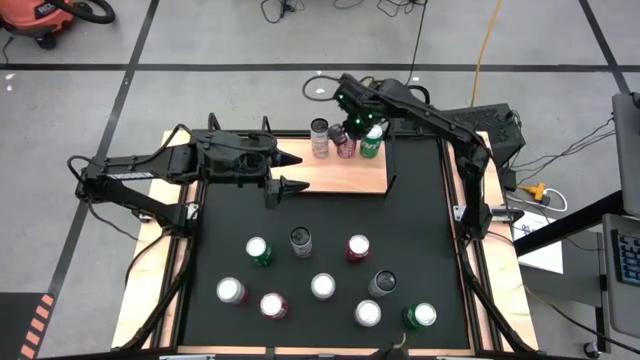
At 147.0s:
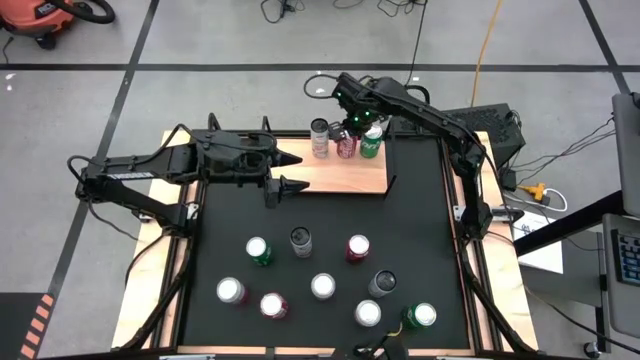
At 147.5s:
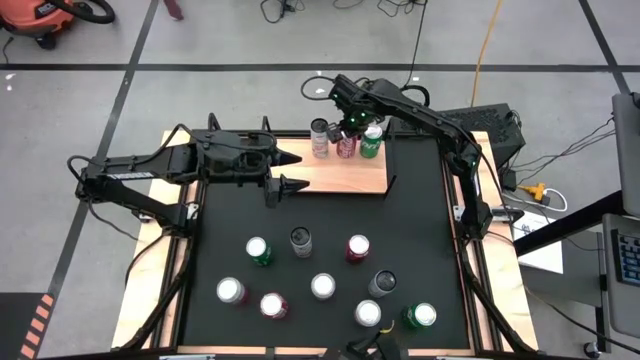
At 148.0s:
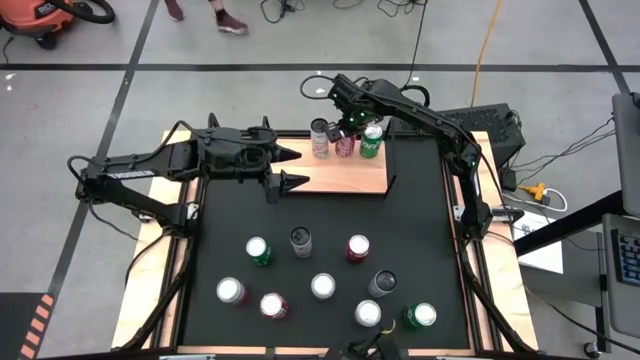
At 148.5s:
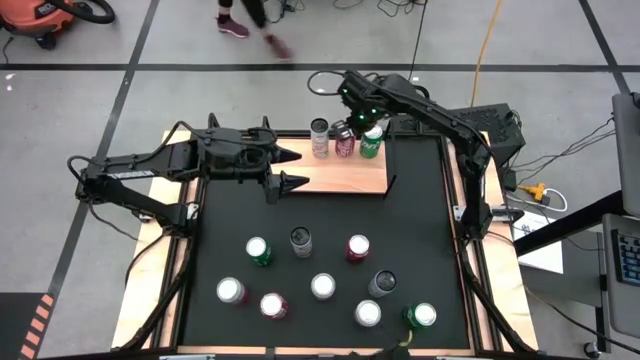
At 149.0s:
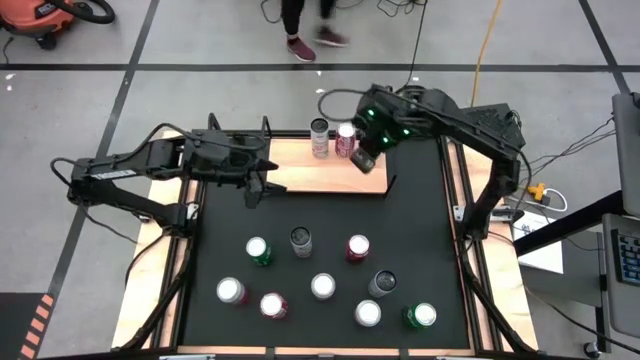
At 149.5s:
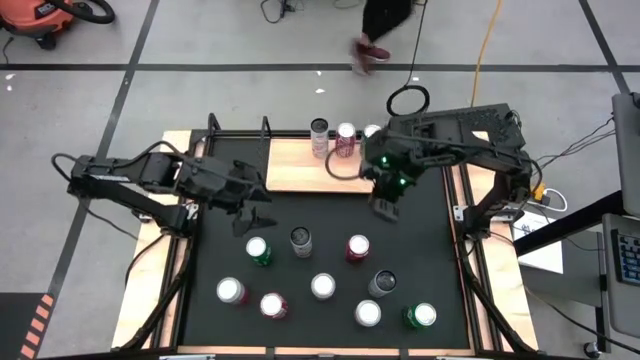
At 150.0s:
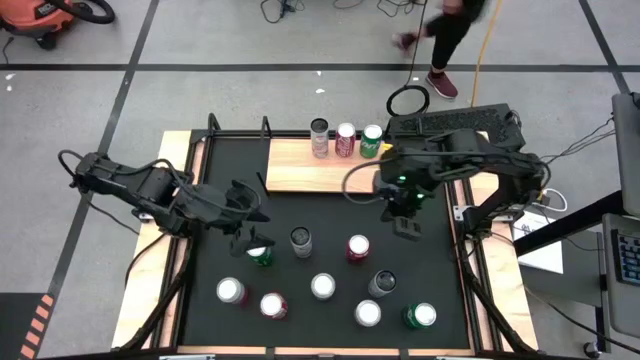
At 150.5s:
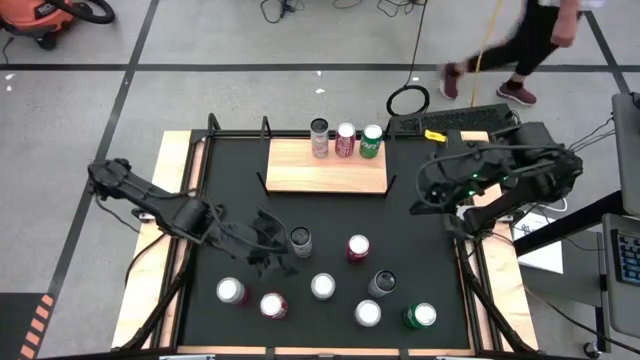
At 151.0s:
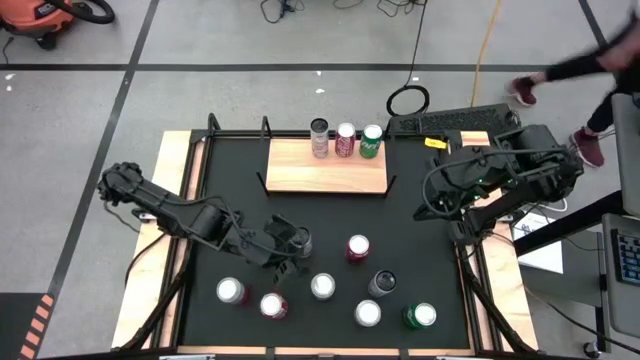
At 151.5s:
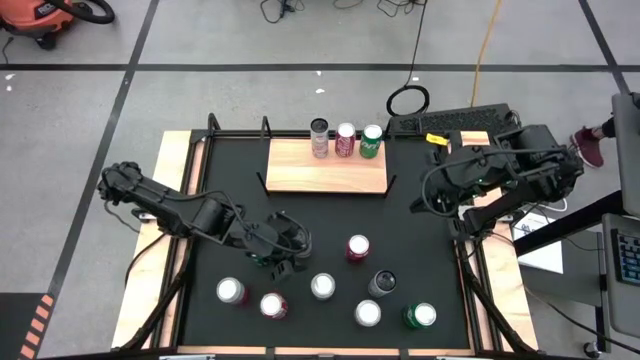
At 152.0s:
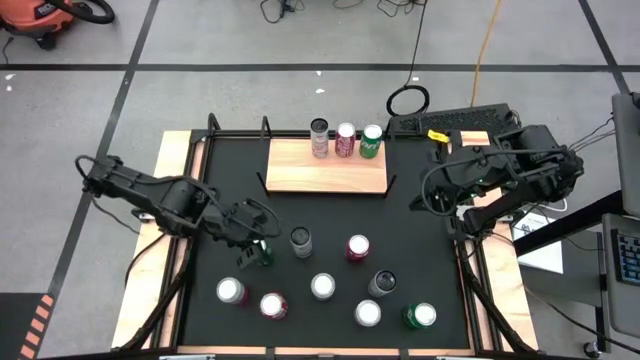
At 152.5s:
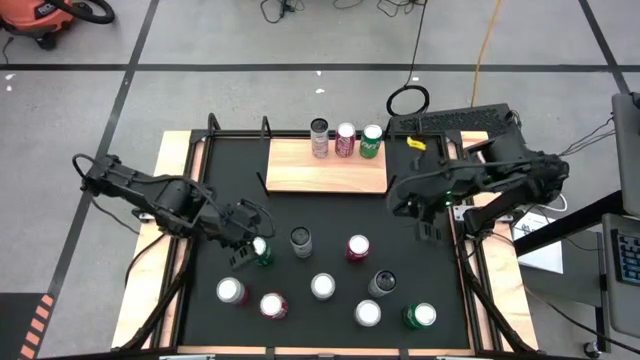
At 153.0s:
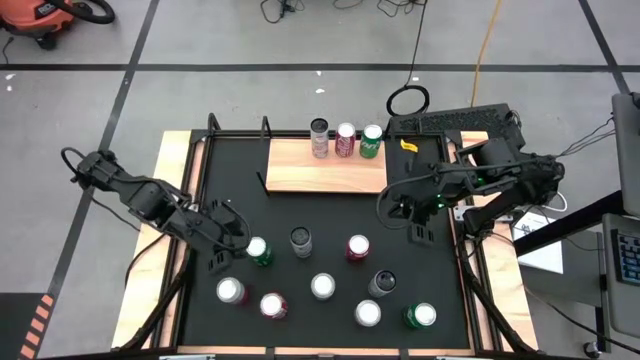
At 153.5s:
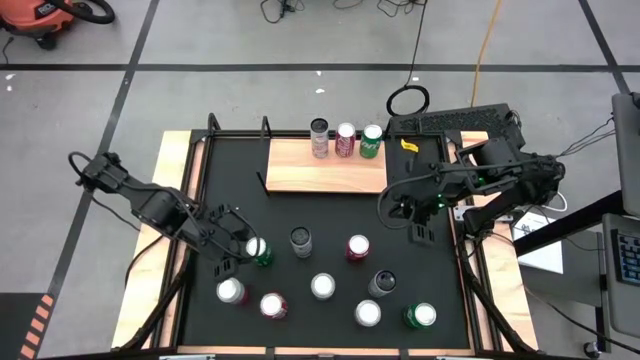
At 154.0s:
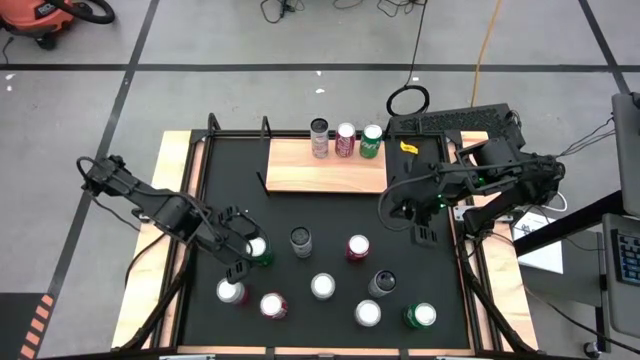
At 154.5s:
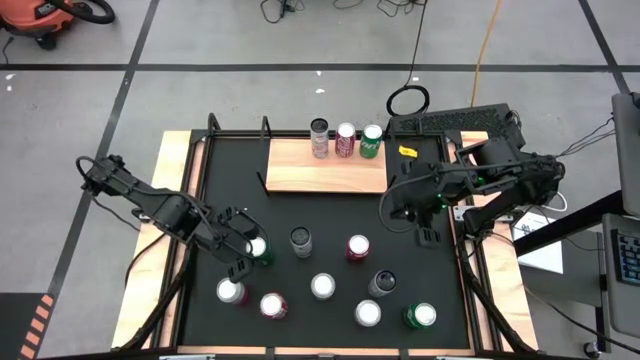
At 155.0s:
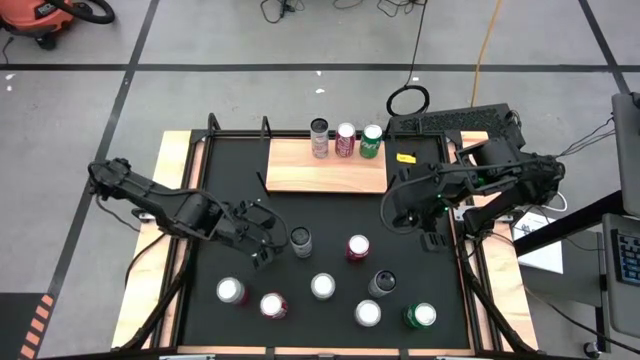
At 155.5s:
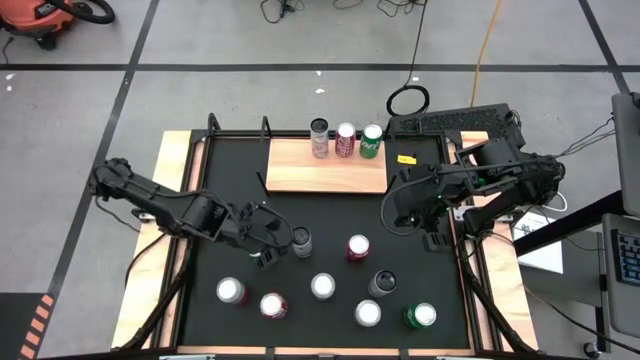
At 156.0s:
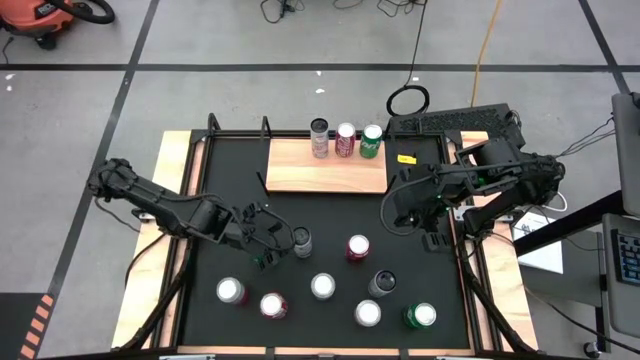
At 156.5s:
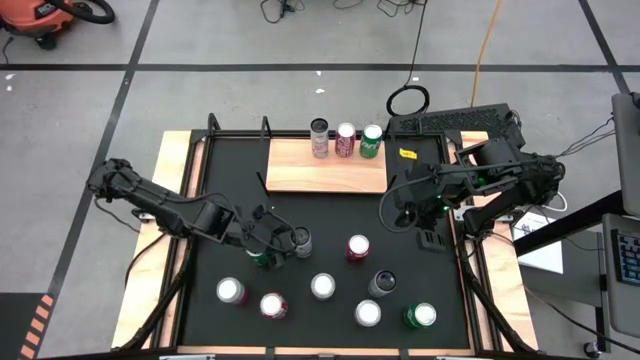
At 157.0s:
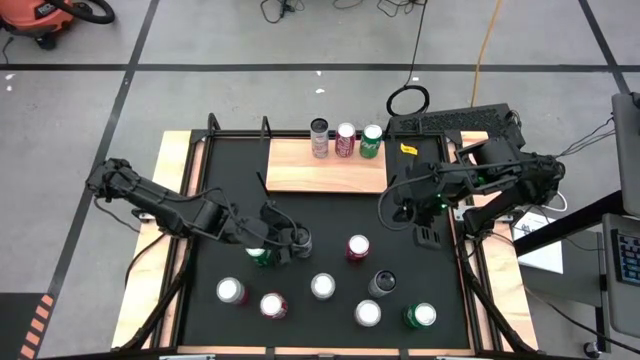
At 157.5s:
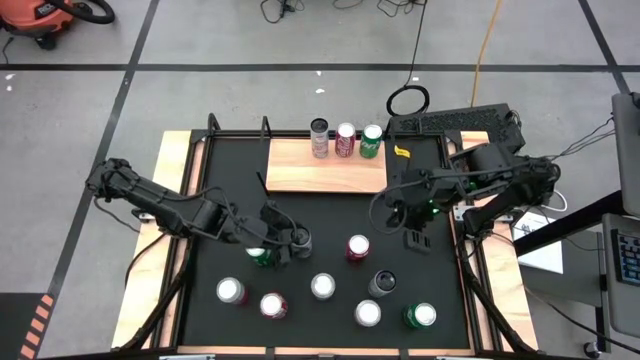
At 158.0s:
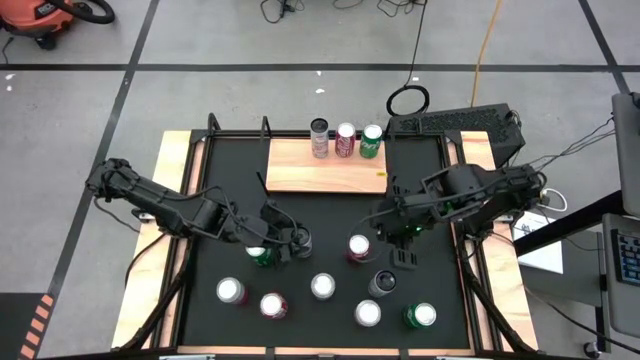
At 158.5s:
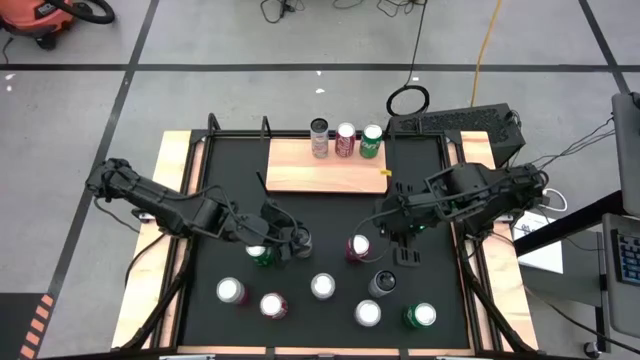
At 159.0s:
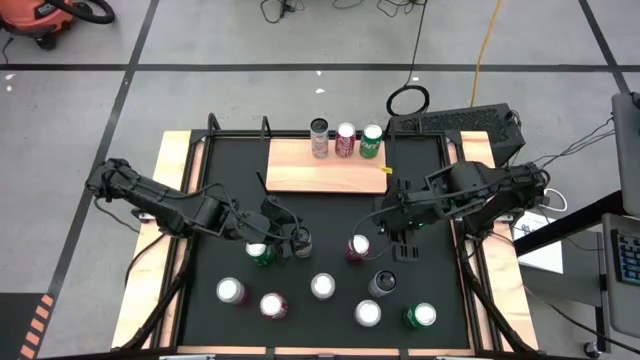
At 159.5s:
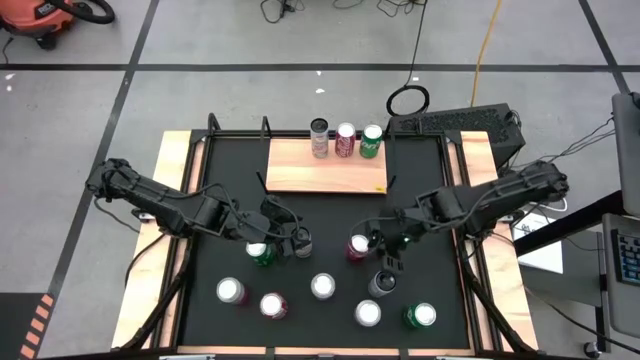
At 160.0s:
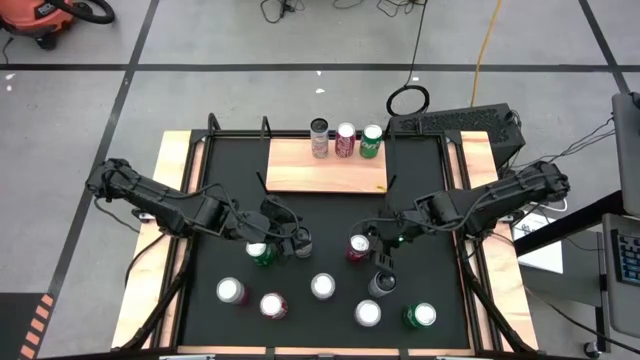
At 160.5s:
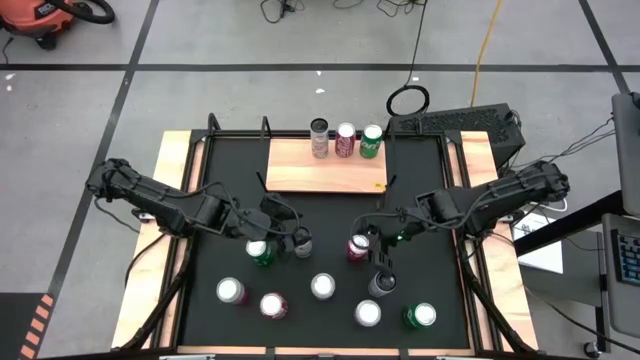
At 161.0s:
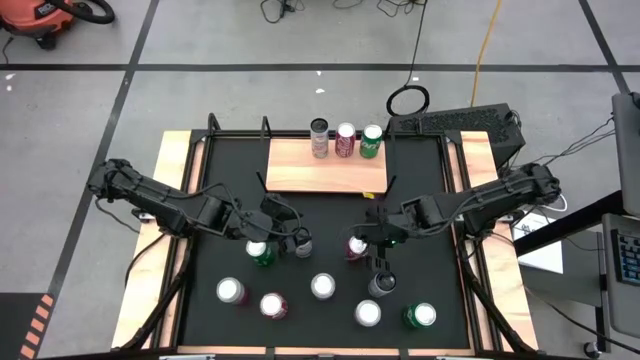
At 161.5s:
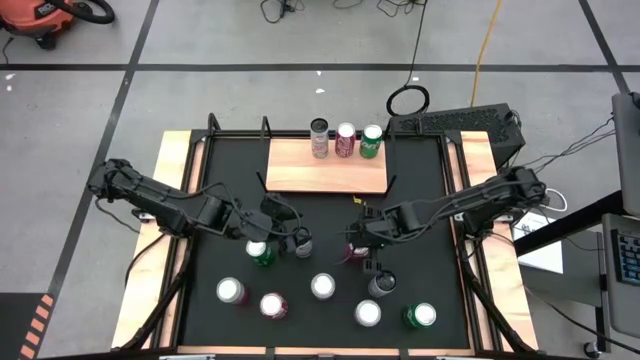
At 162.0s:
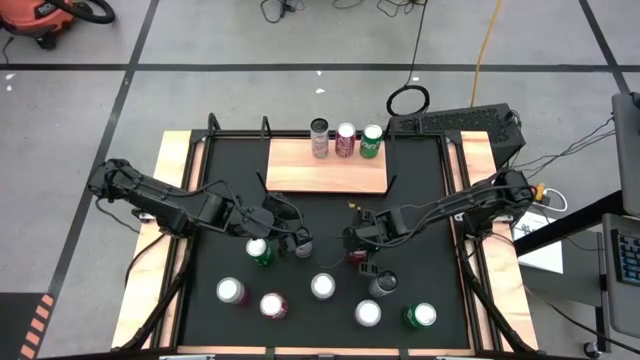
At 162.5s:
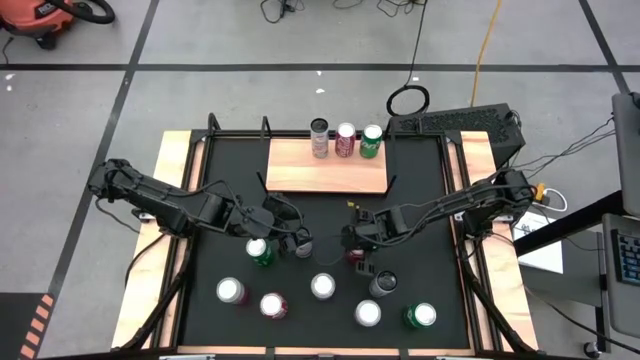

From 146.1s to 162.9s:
Task: Place canned beverage on shelf
Put the top red soda can on the shelf

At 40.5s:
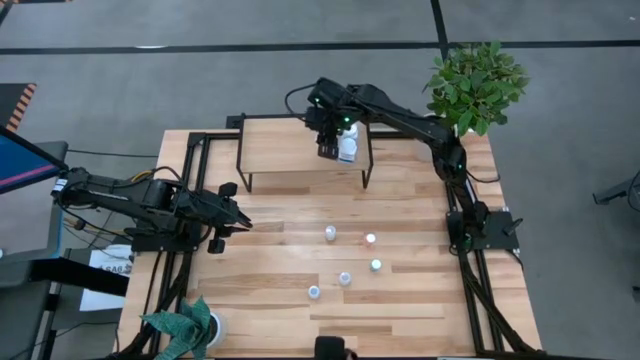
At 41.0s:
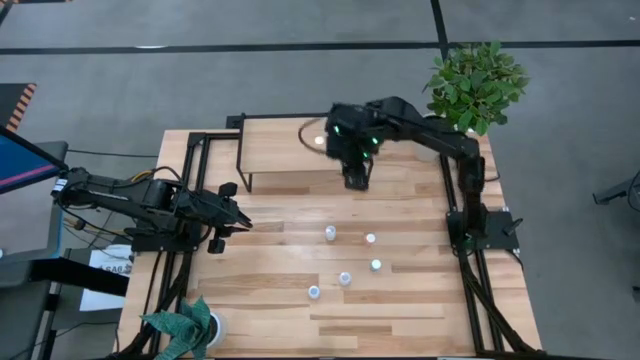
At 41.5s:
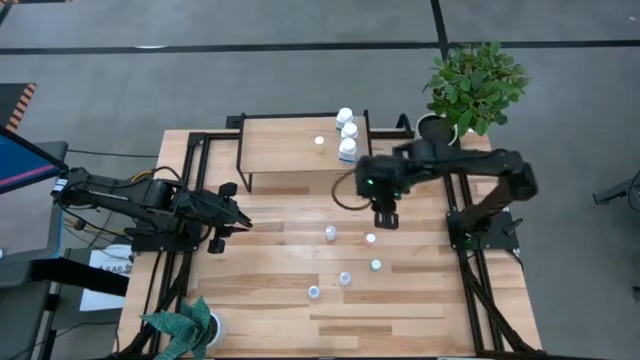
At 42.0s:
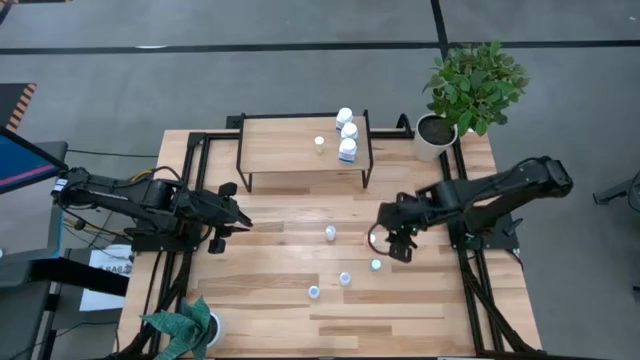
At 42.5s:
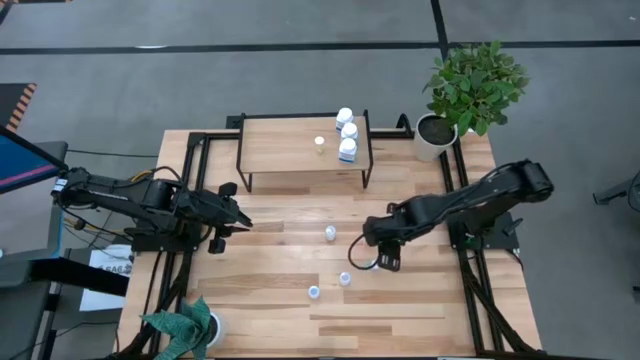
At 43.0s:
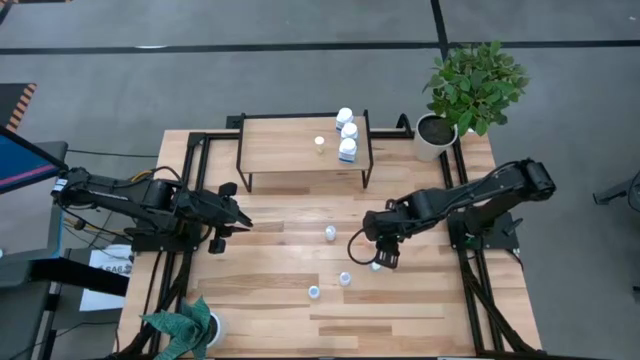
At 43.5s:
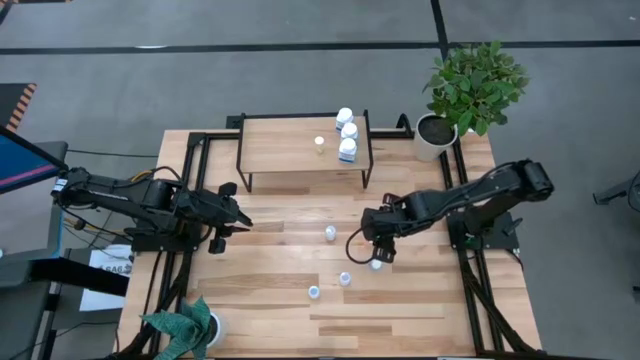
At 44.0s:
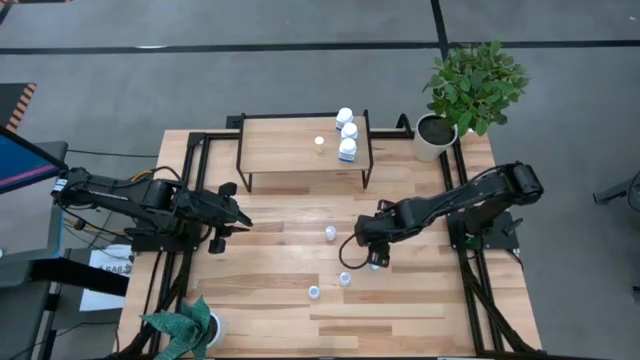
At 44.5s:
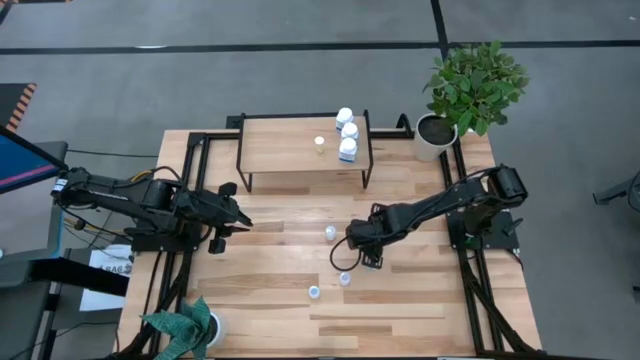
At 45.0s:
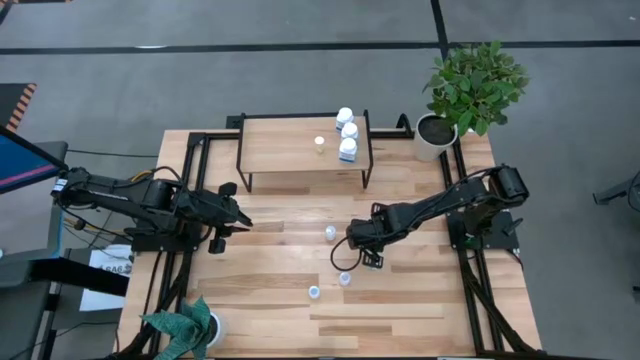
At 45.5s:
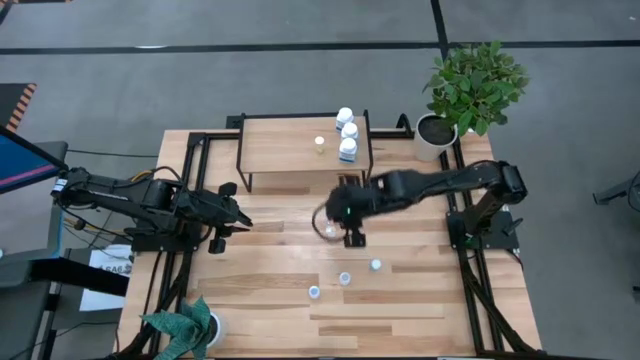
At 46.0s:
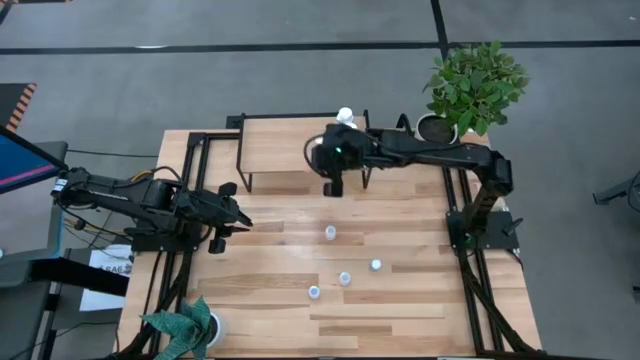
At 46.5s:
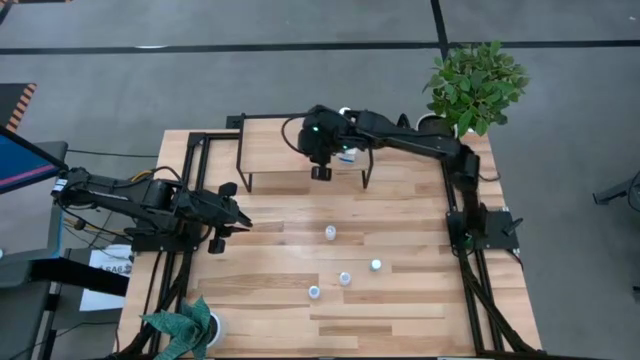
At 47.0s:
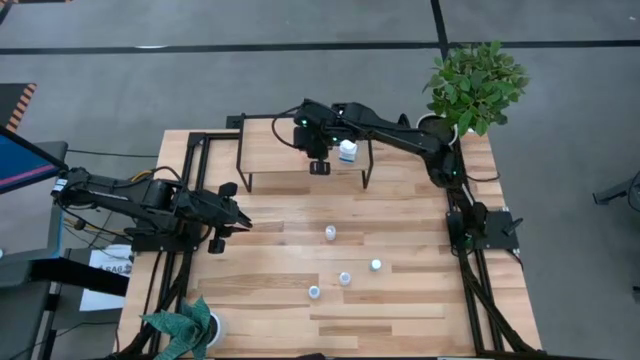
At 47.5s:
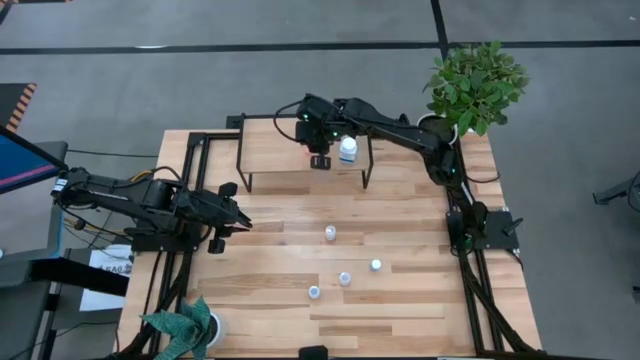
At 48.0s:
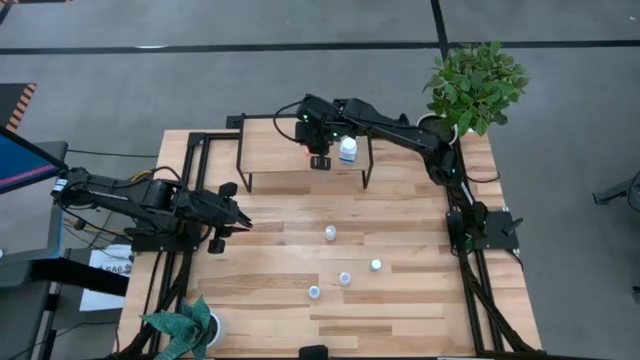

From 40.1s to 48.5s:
Task: Pick and place medicine bottles onto shelf by color
Put the pink pill bottle on the shelf
